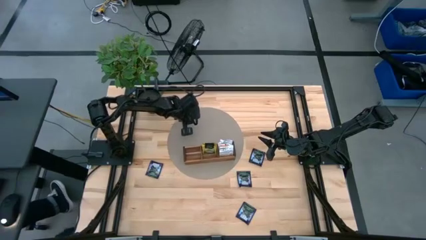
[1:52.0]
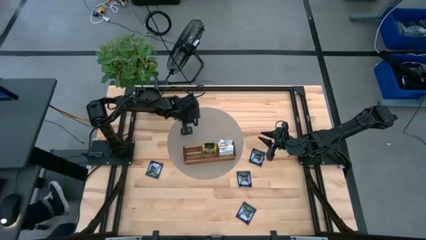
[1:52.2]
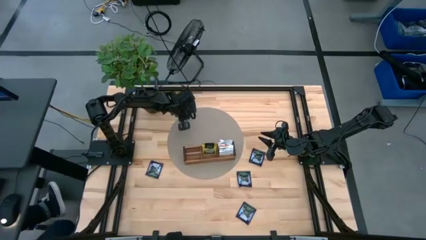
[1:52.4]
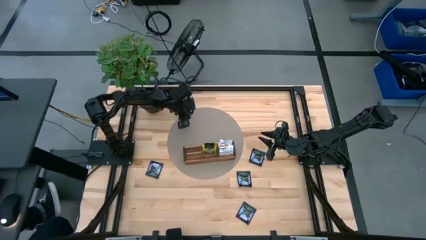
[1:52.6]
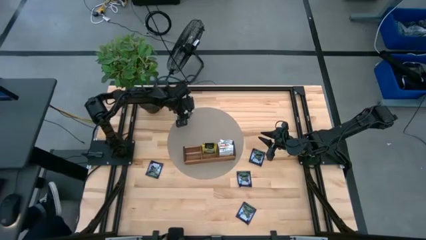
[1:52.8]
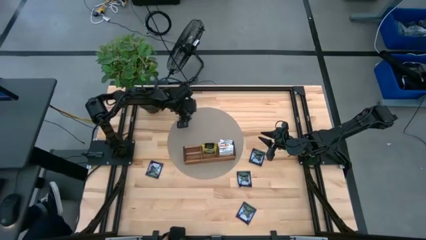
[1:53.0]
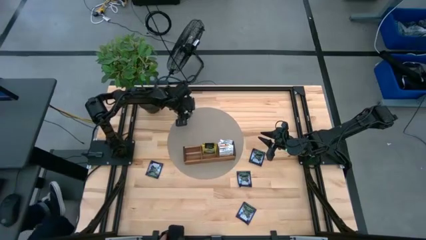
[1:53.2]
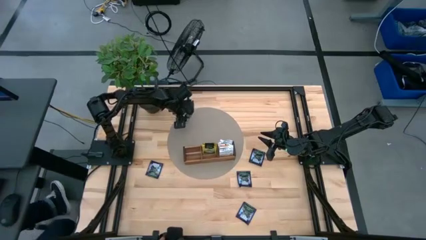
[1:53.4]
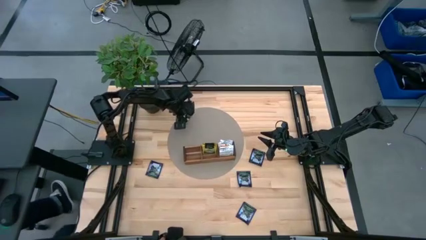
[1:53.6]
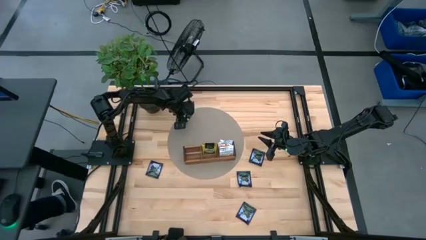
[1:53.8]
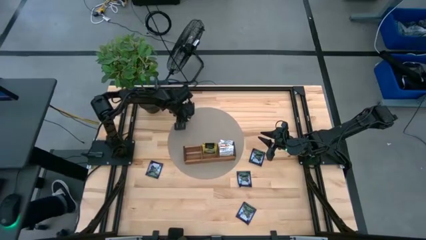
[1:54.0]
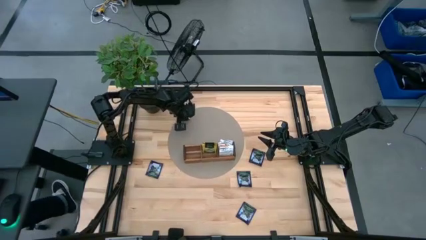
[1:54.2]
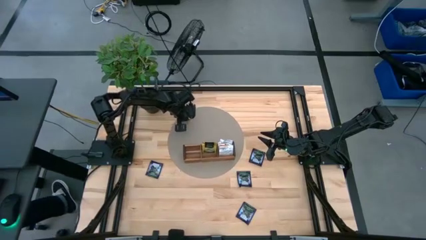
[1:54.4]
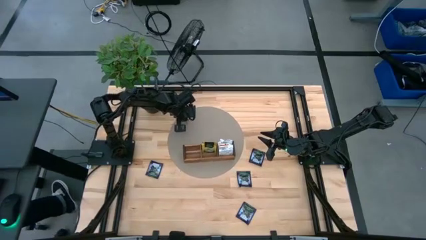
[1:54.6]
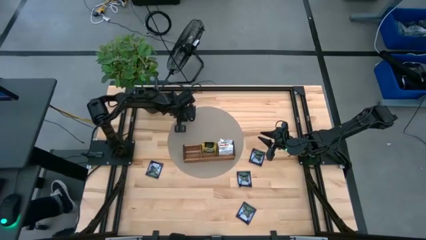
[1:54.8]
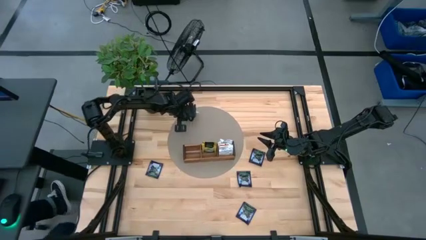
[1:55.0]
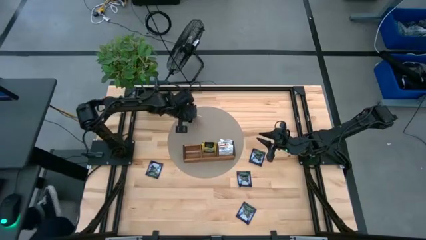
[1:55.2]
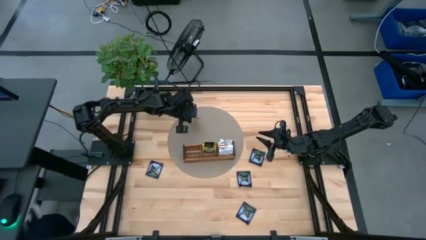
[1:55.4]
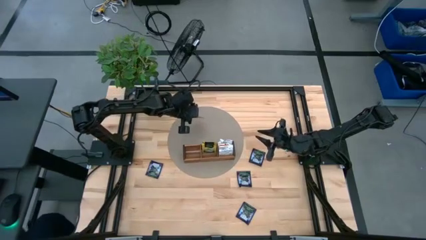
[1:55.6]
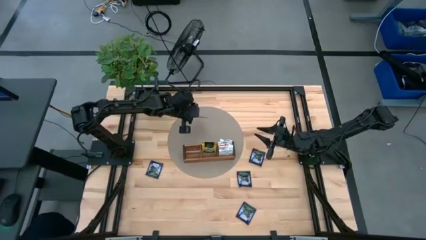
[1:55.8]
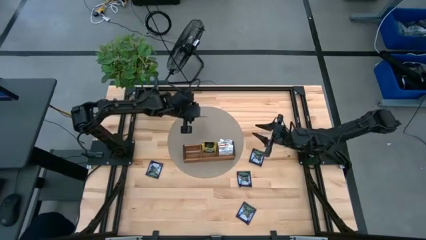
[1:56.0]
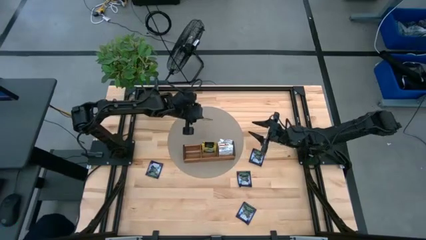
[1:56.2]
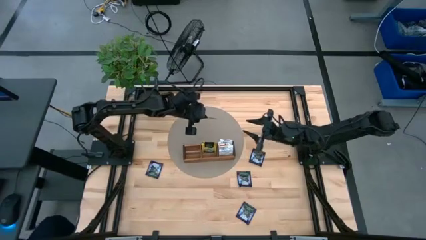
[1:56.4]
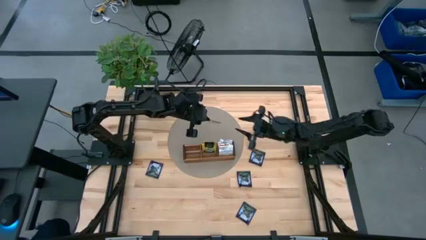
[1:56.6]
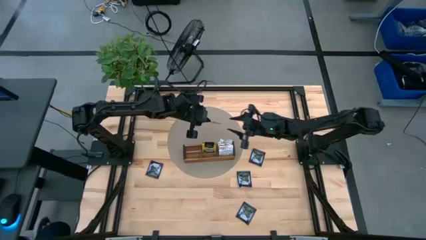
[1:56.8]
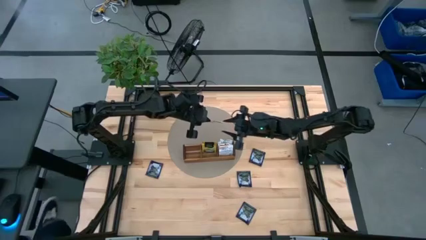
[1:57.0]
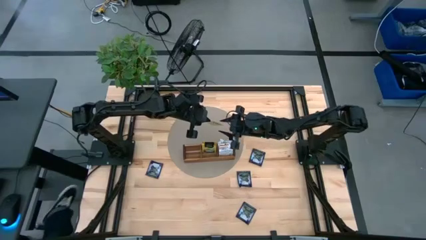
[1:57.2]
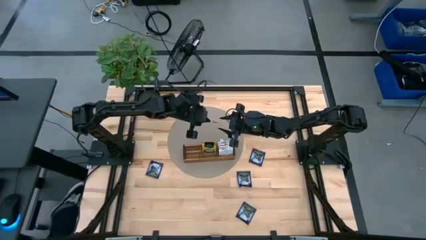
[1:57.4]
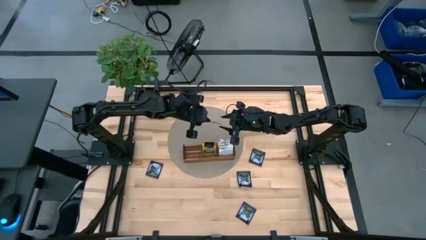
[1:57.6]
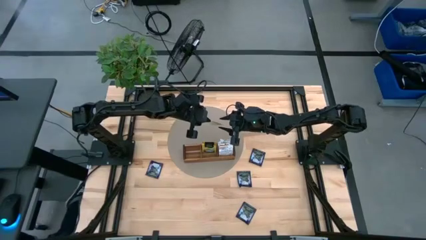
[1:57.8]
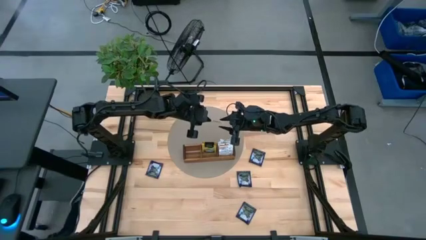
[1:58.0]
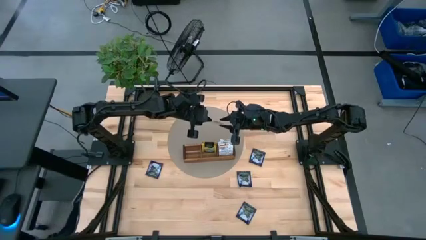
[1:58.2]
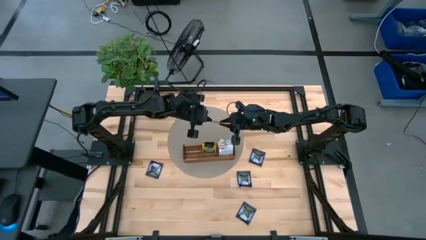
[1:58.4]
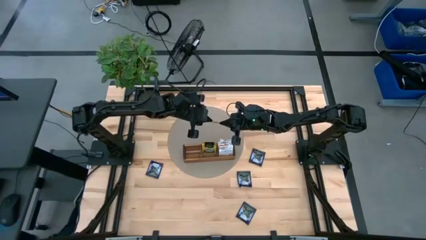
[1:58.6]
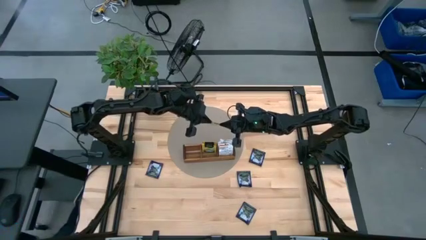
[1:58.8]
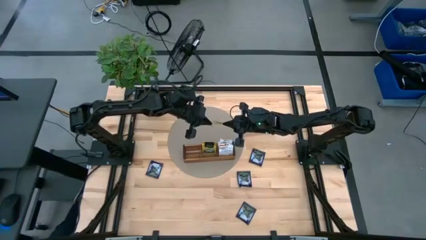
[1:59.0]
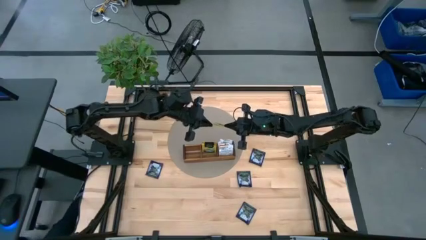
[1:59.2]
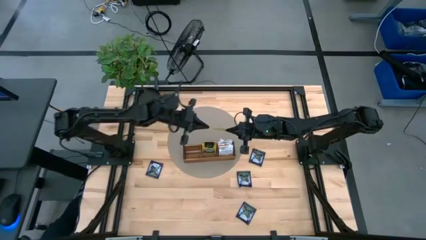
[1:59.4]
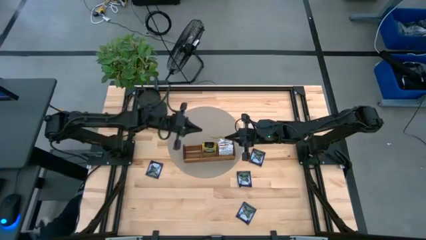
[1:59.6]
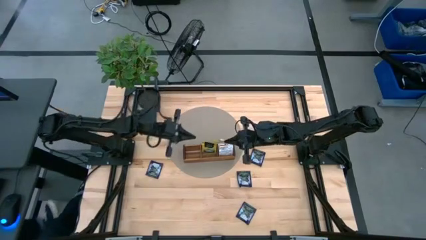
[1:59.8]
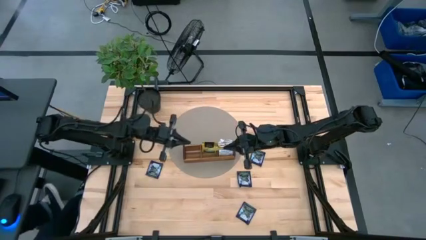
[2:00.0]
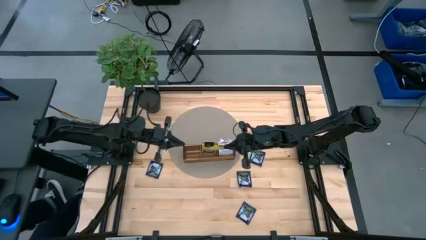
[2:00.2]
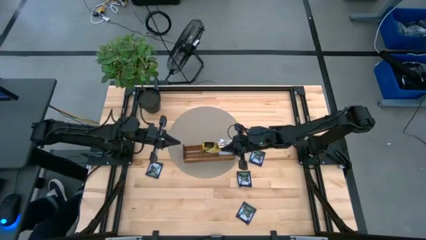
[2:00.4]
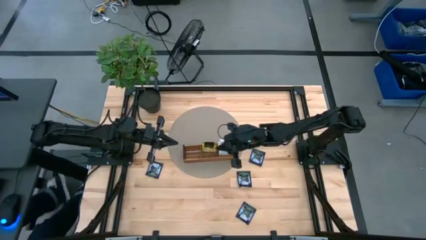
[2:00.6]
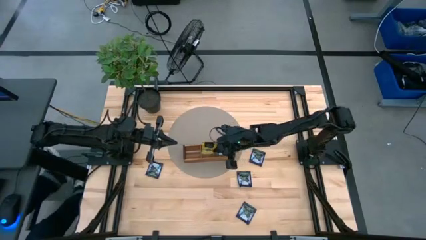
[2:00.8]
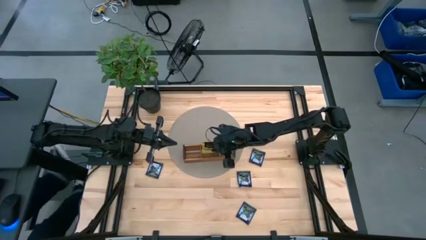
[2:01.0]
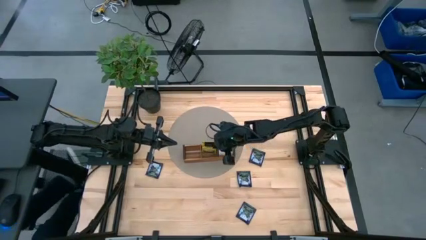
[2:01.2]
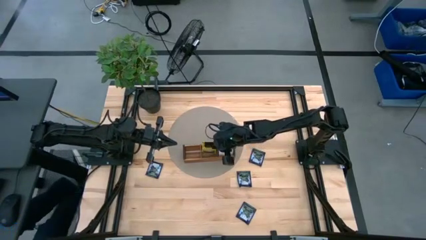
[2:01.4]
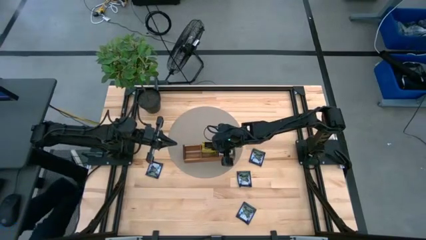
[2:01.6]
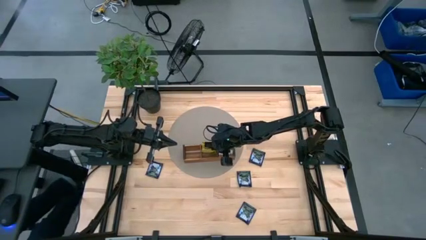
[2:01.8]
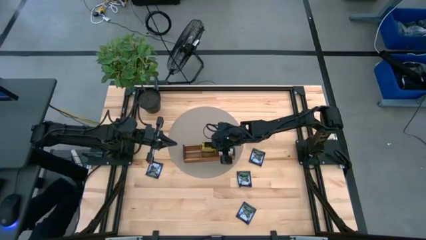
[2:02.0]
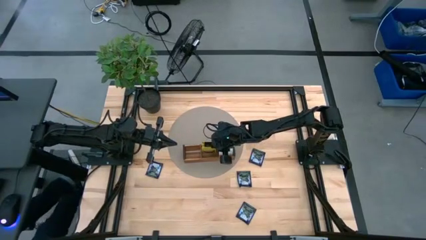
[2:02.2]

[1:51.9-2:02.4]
Task: Pick & Place Tea
Put the yellow tea bag into the middle section of the wooden organizer

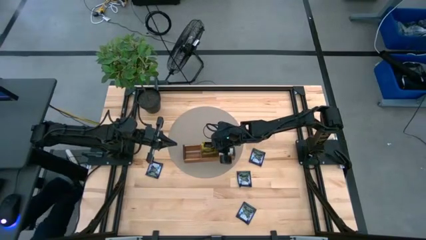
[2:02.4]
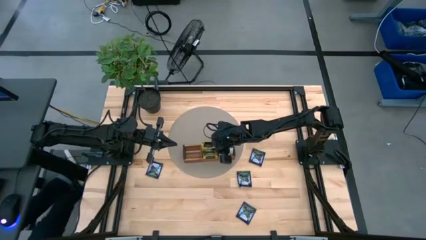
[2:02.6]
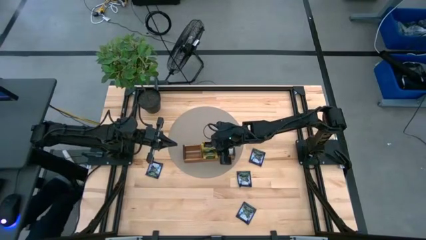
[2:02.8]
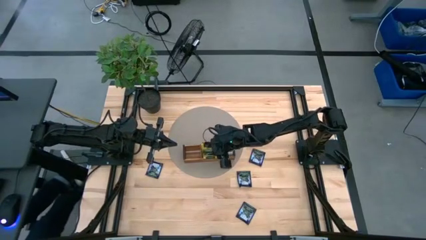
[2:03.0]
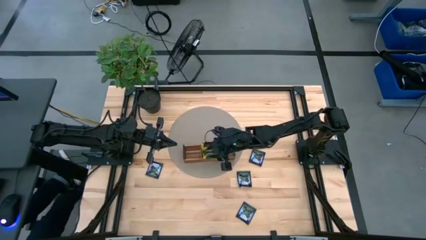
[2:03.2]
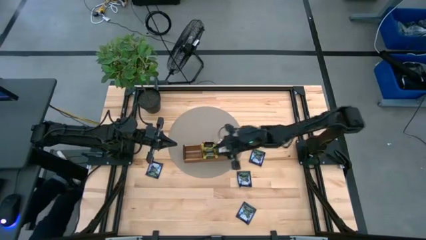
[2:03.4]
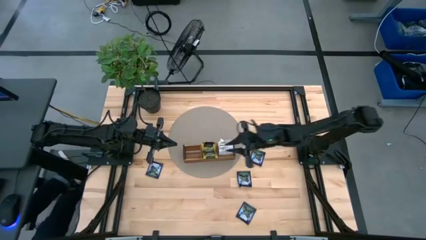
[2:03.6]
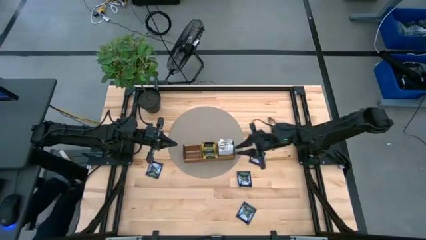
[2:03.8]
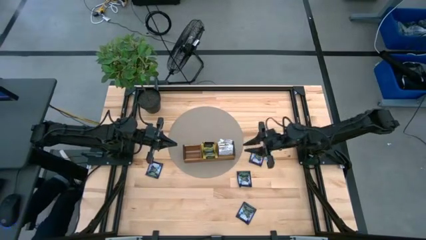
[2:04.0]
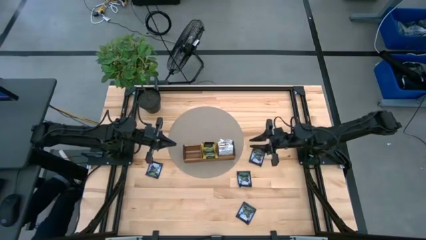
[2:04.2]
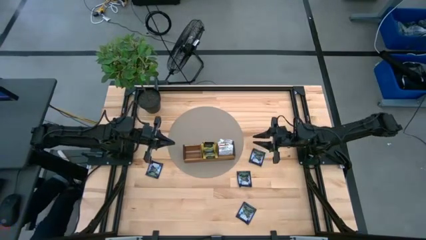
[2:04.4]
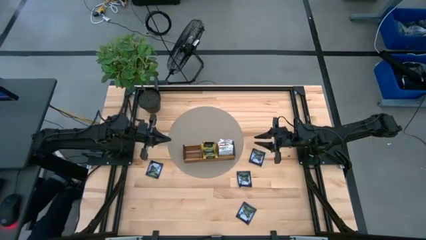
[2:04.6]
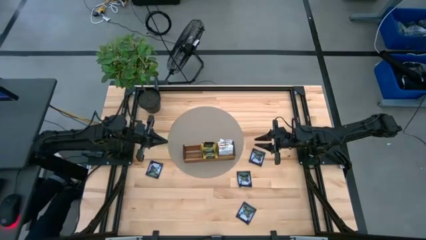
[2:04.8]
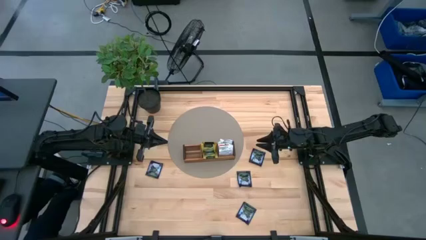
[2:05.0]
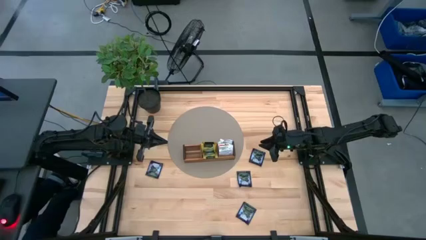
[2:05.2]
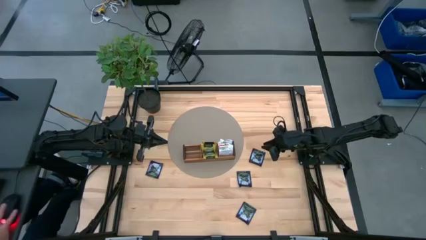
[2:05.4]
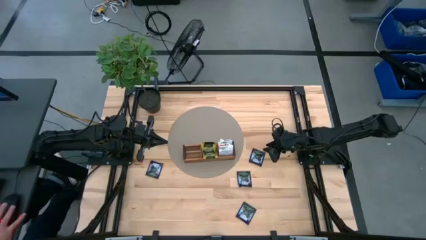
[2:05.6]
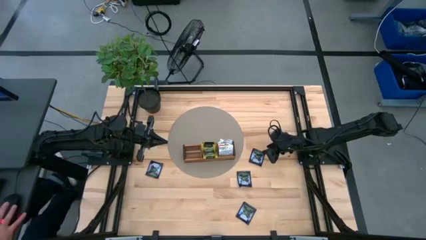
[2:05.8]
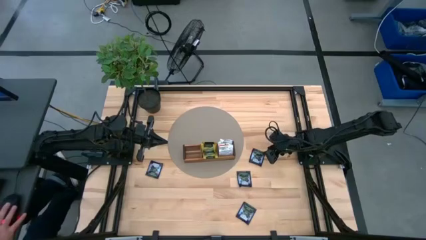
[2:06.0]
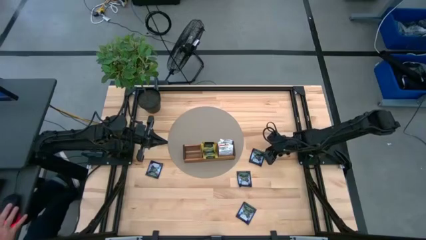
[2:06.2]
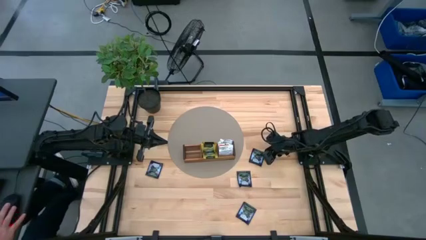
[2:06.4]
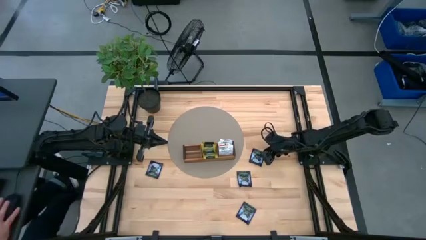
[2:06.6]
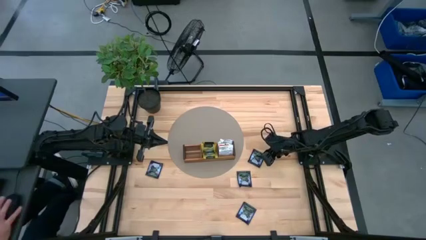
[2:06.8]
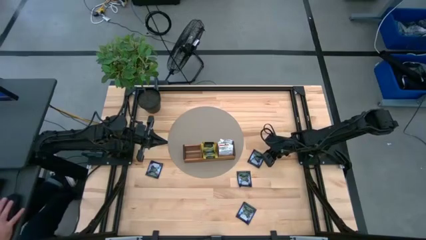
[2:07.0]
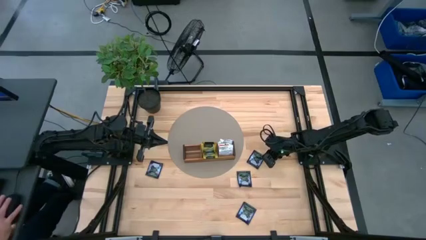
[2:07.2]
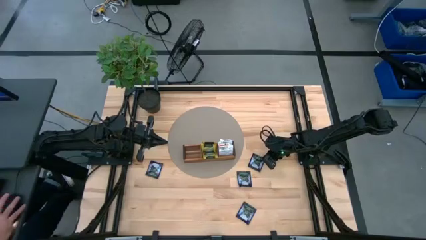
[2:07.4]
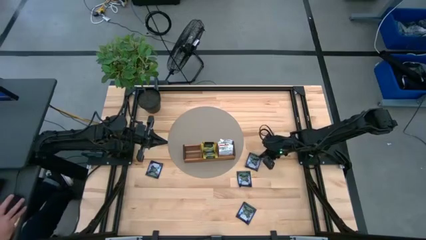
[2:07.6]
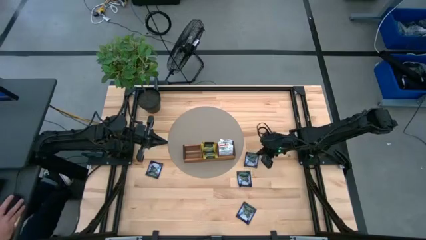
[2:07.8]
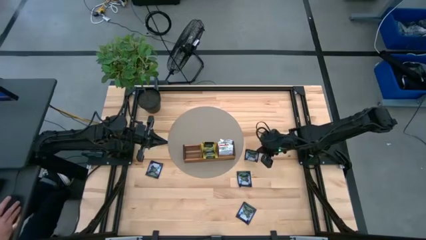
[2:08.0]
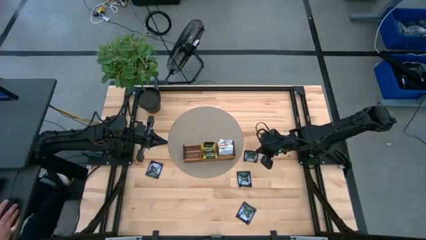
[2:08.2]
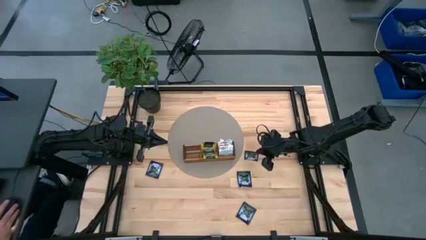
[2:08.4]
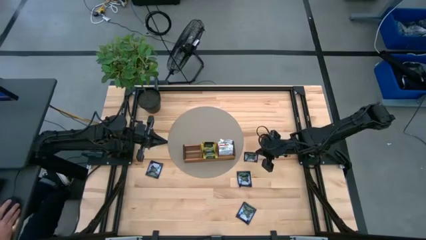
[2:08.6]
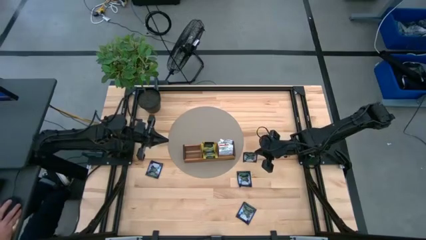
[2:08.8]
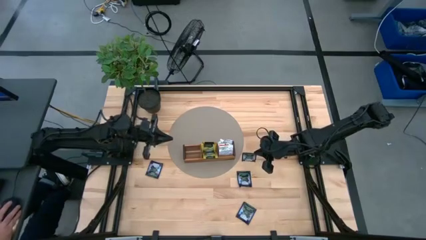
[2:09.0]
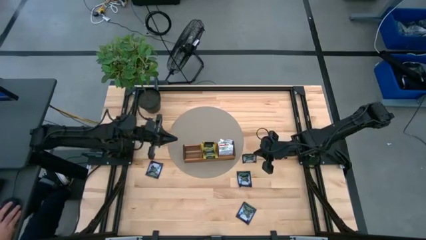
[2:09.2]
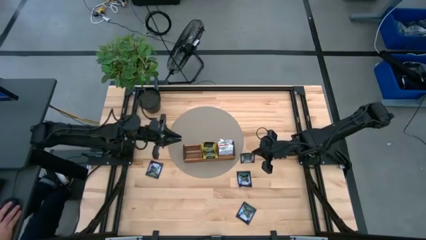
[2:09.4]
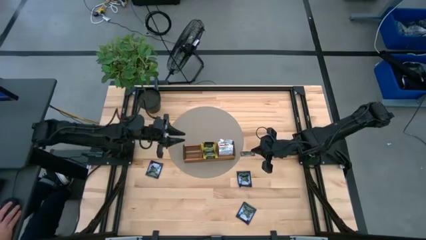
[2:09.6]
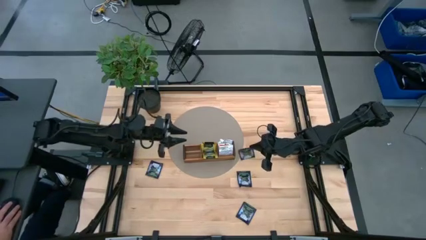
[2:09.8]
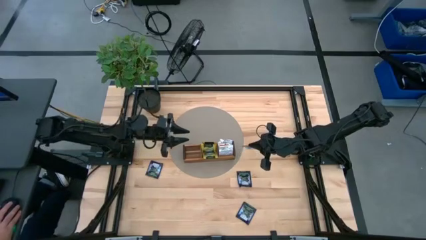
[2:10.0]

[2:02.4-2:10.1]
Put the purple tea bag into the left section of the wooden organizer
